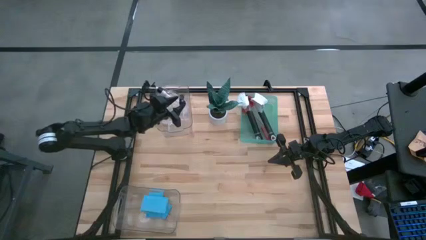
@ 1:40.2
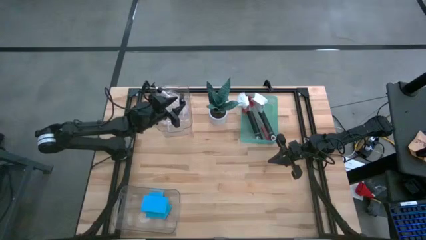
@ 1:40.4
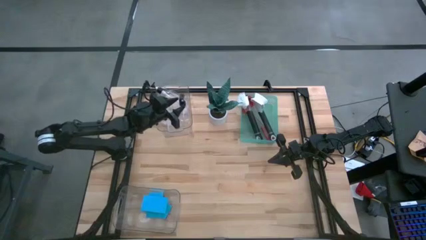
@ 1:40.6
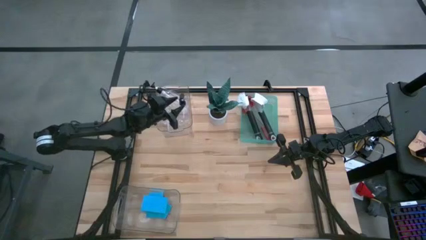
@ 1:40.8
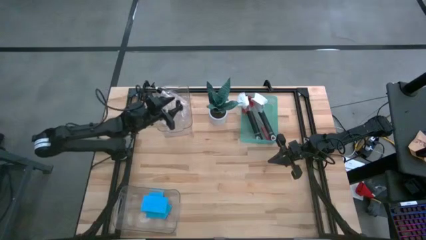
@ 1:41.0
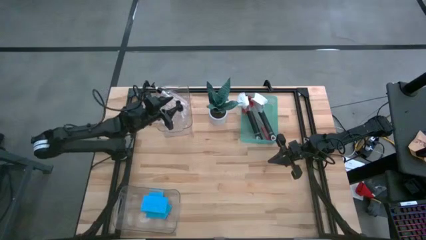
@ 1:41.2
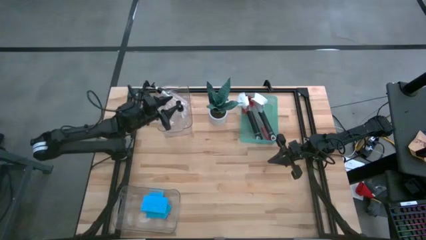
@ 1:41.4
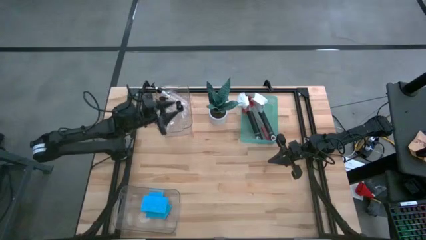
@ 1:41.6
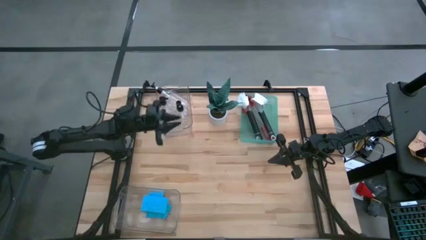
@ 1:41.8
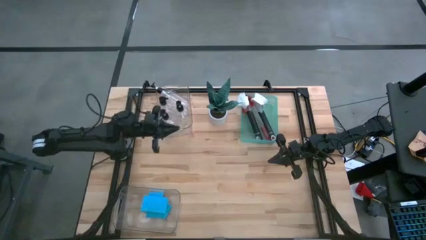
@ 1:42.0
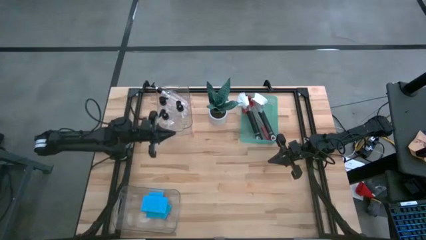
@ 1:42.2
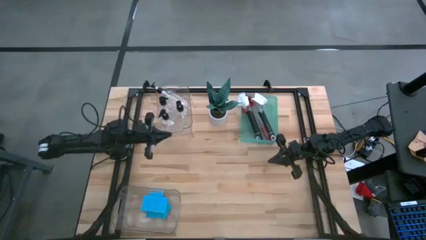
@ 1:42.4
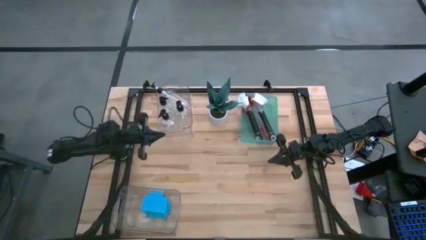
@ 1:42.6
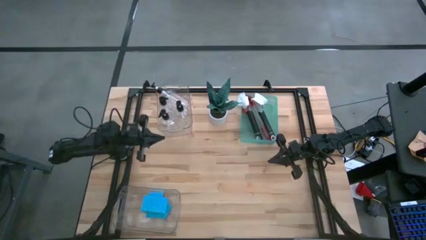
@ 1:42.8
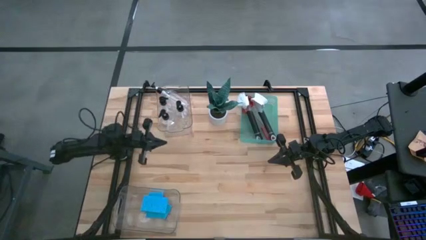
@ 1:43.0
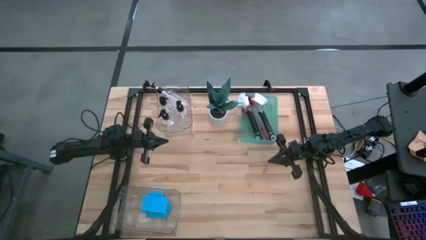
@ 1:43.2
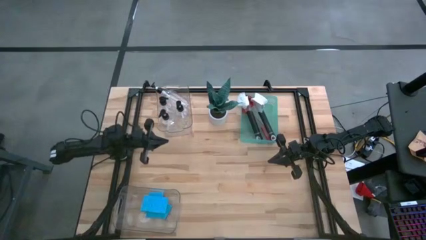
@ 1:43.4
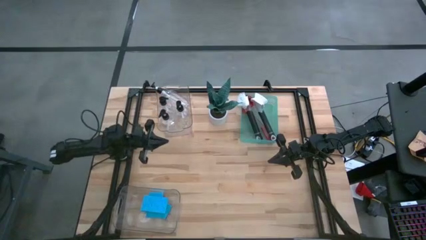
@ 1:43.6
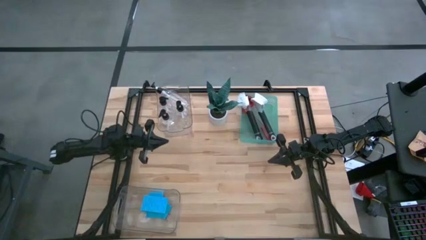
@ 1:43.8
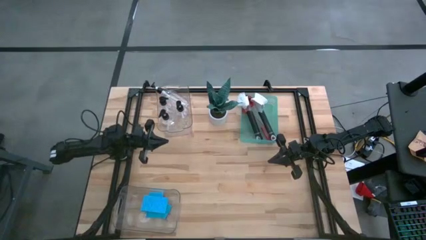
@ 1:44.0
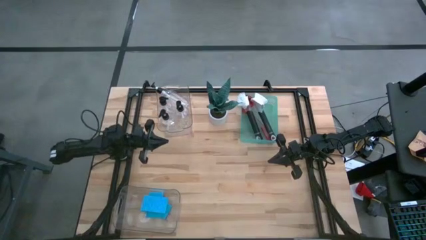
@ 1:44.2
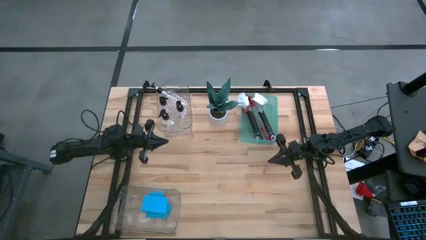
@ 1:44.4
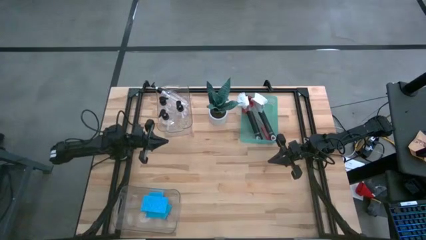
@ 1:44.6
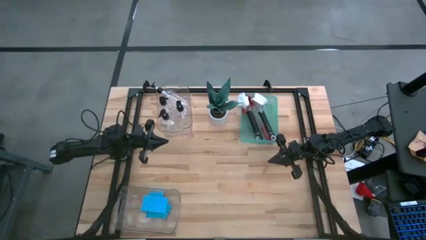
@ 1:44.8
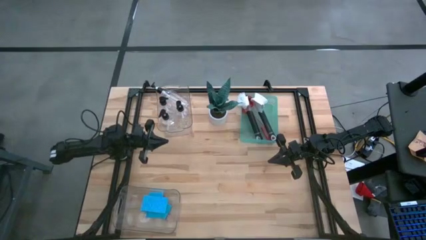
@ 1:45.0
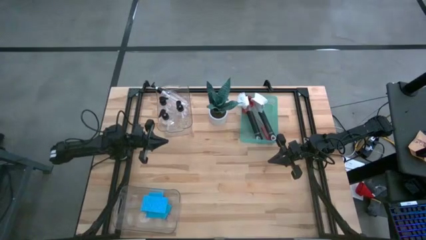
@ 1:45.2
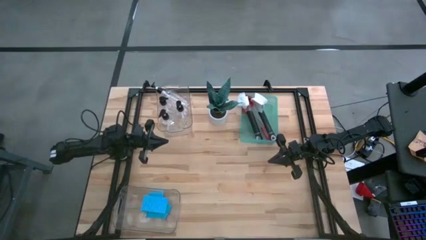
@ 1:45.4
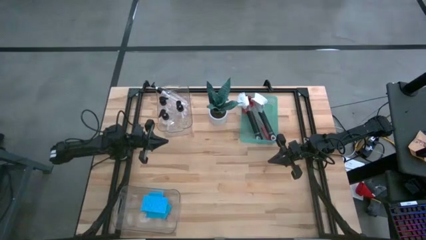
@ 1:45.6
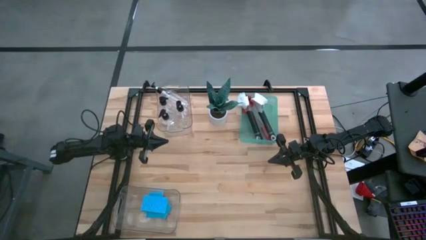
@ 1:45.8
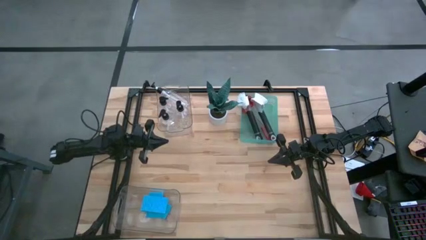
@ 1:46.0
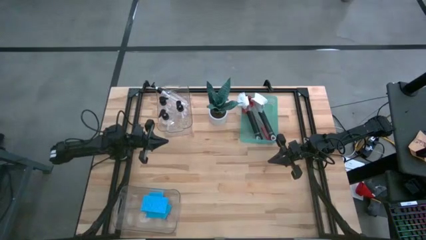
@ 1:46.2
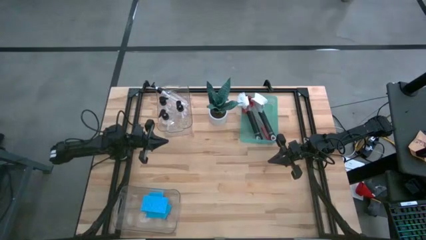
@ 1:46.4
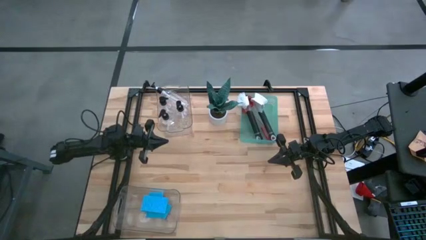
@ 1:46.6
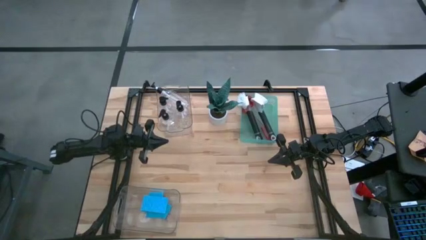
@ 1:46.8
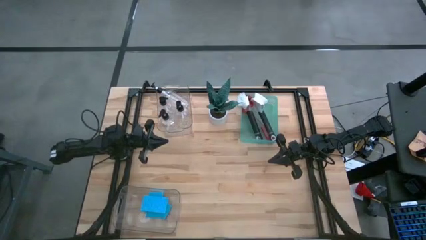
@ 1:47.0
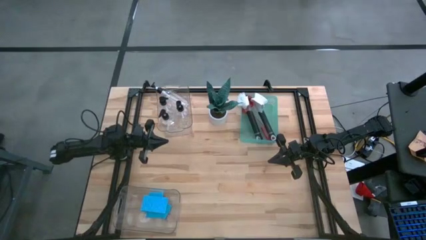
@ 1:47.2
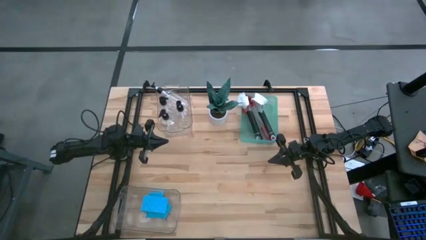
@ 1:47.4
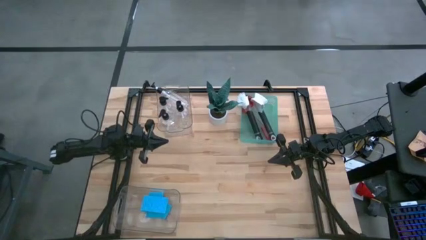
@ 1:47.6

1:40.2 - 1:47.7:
Task: Pick & Place Kitchen Sink Supplies
Return to Home Position
